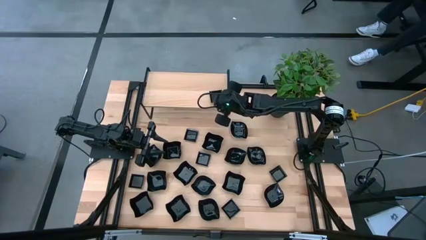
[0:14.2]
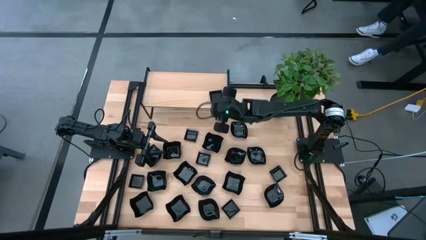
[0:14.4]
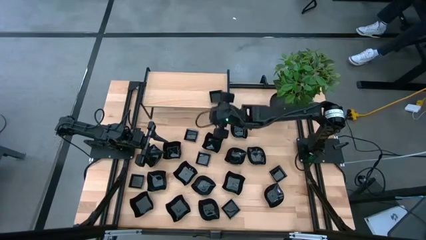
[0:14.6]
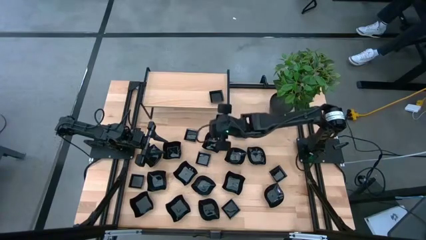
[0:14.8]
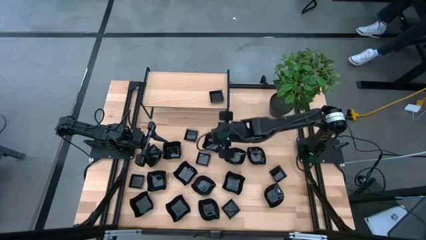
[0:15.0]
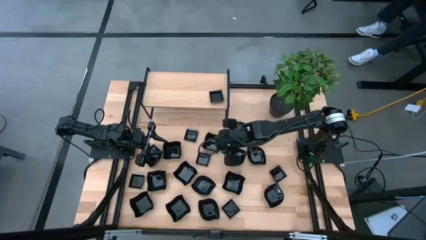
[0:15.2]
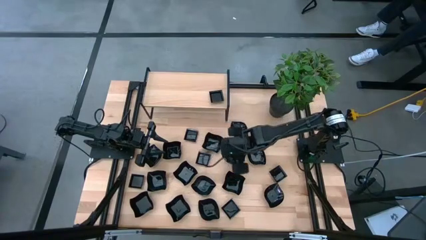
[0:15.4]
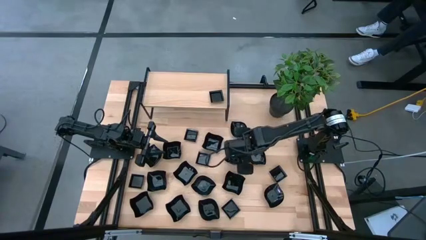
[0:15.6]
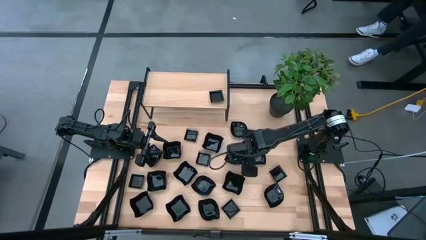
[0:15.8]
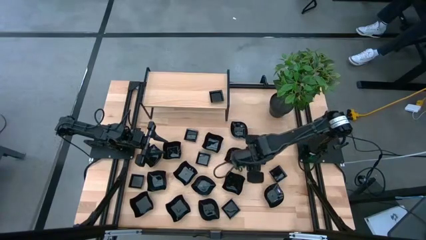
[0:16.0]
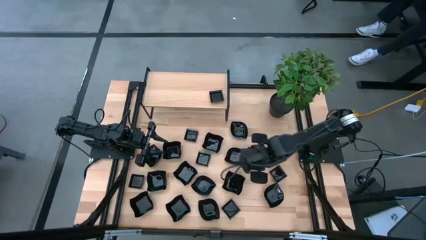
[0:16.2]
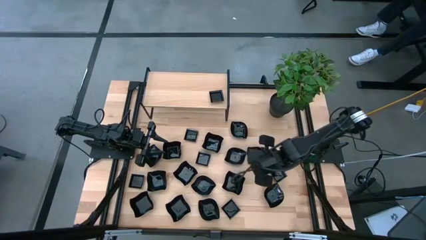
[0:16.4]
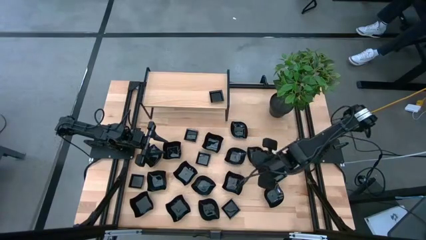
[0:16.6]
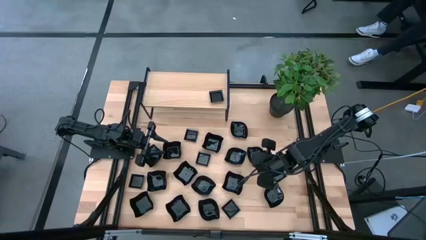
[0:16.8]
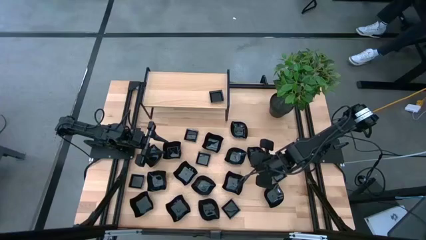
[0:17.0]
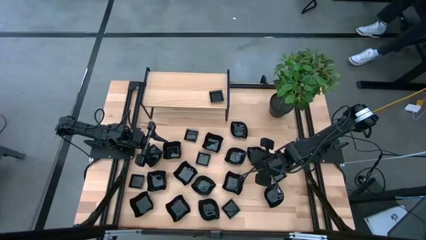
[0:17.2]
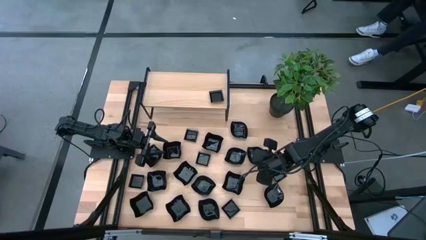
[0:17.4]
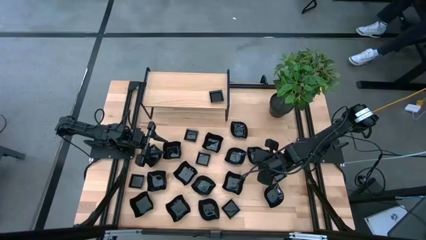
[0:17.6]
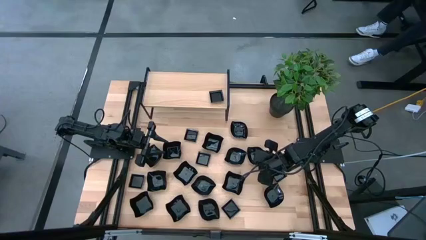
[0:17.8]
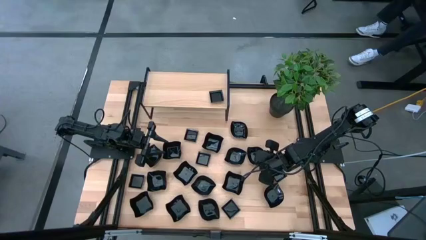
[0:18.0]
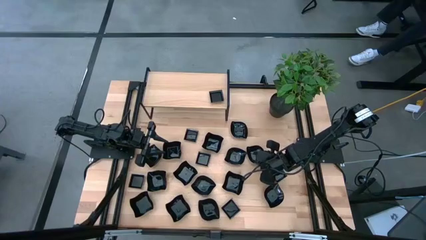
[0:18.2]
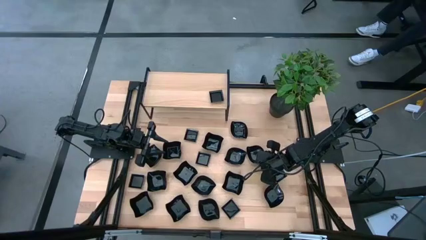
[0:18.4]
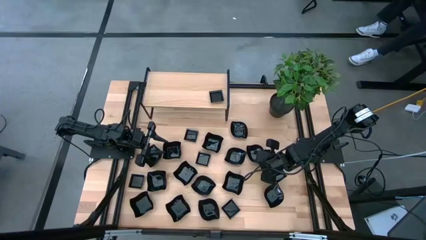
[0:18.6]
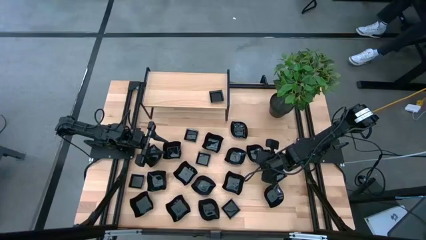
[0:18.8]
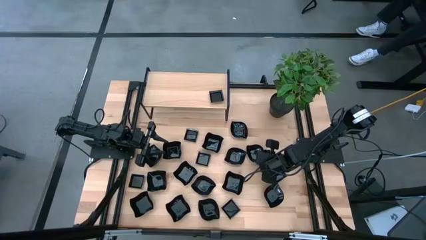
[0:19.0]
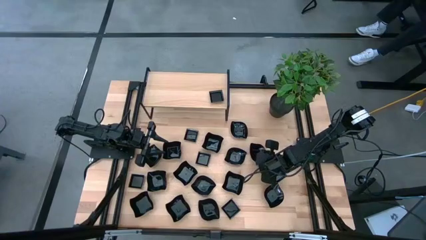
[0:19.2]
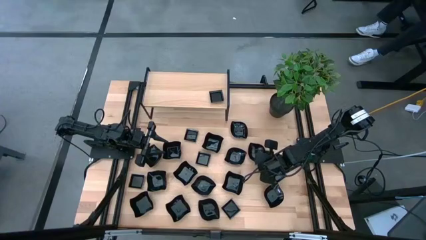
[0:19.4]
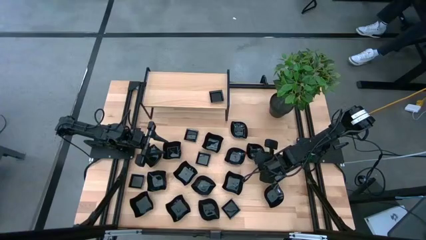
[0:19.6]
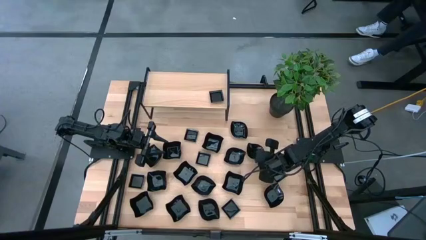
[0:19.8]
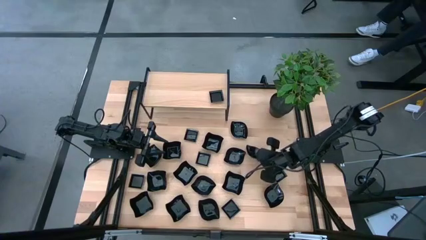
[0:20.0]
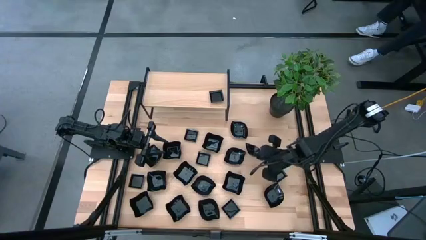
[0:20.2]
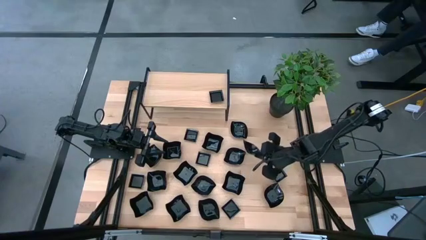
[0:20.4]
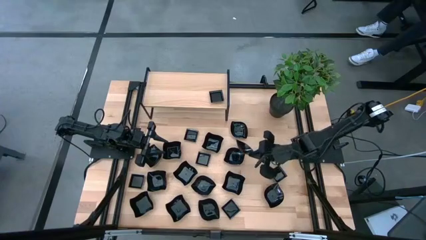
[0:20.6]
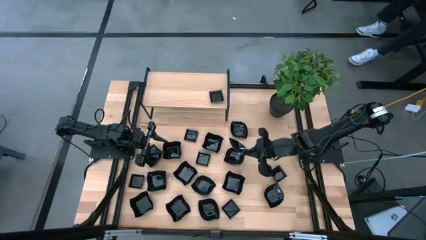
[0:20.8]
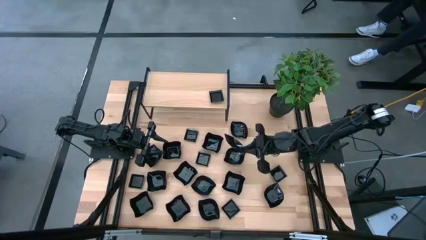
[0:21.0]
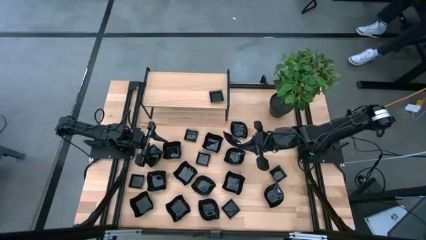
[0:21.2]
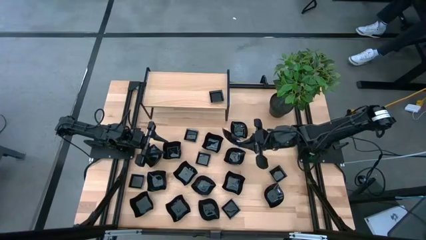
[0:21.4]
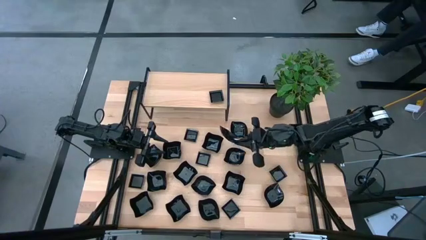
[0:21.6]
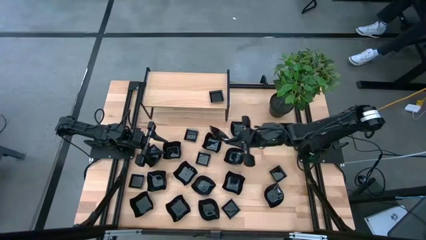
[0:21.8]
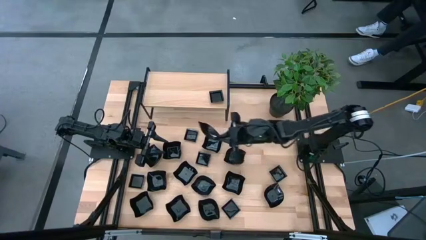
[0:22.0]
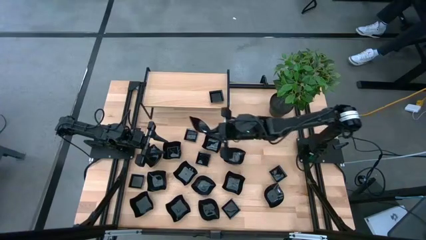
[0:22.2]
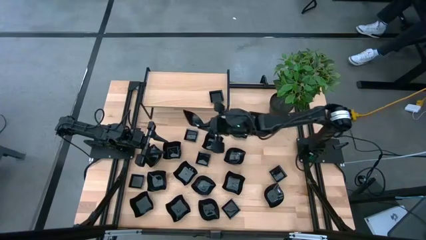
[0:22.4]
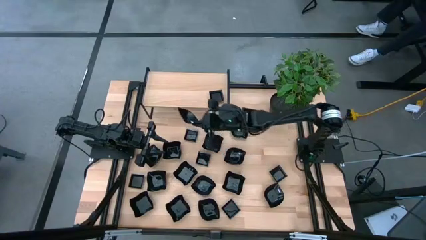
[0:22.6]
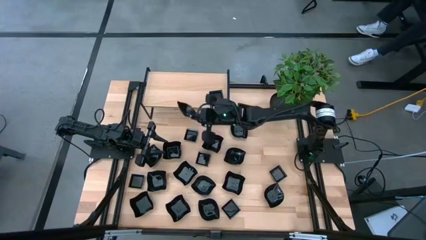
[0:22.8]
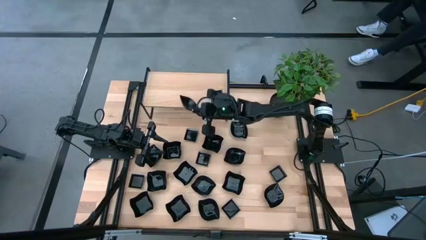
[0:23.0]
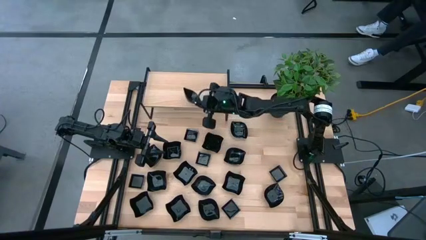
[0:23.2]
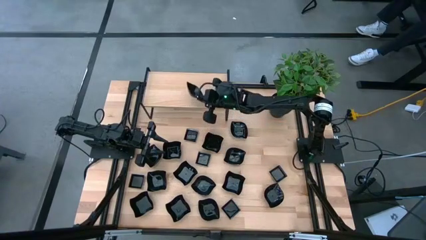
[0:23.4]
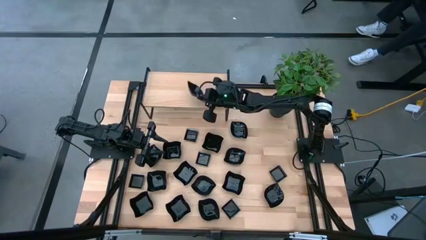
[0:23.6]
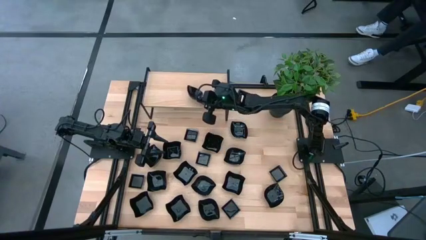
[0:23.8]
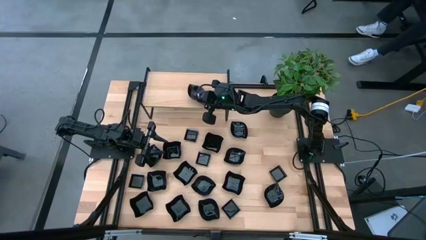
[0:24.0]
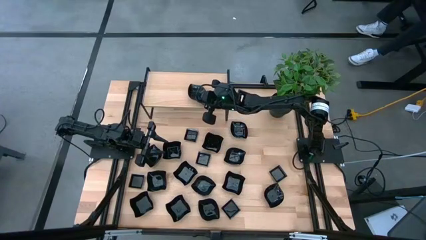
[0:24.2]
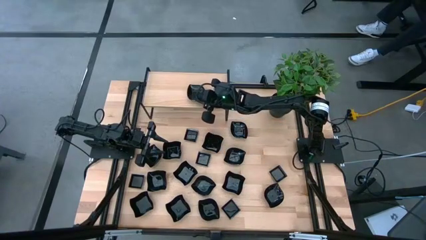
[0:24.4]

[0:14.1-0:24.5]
Task: Pick & Place Mini shaped plates
Put the leaf shaped plate on the shelf

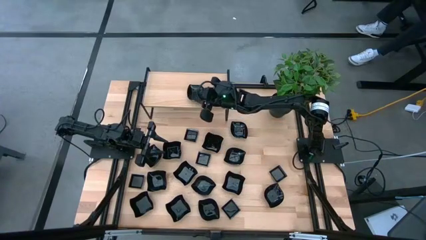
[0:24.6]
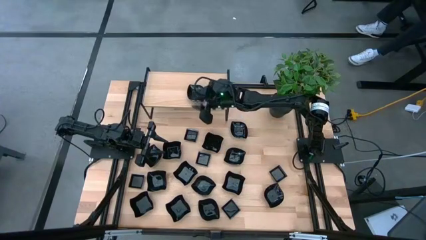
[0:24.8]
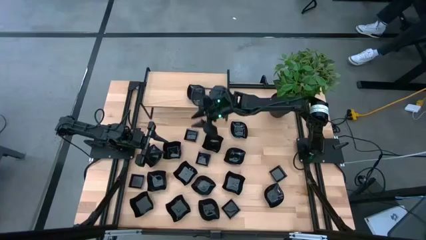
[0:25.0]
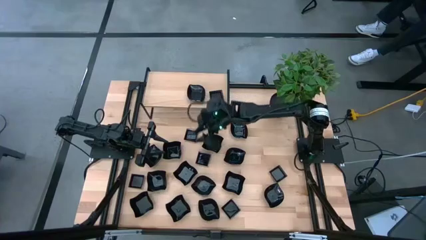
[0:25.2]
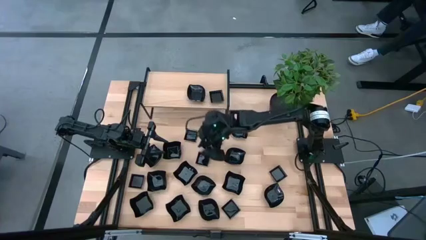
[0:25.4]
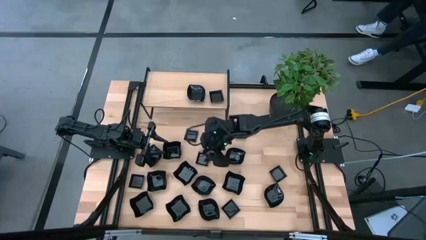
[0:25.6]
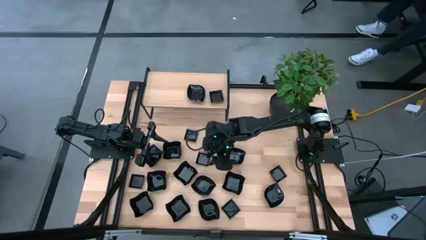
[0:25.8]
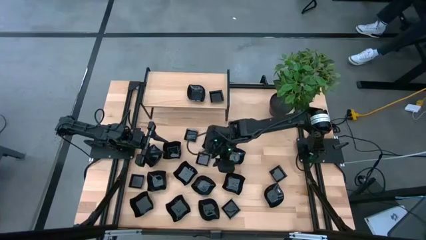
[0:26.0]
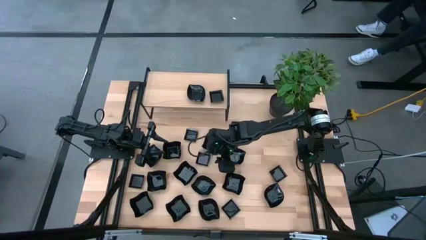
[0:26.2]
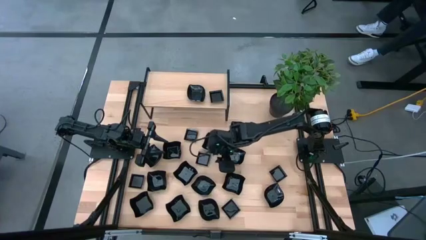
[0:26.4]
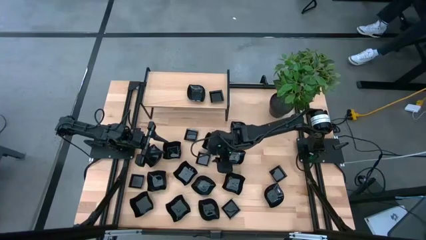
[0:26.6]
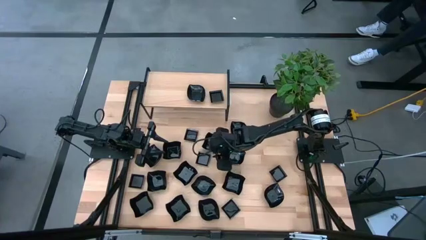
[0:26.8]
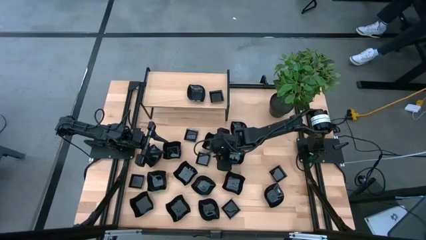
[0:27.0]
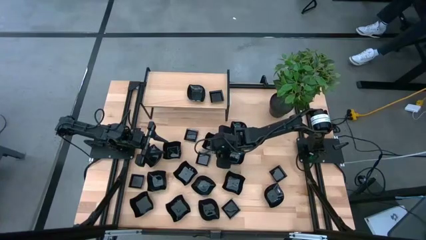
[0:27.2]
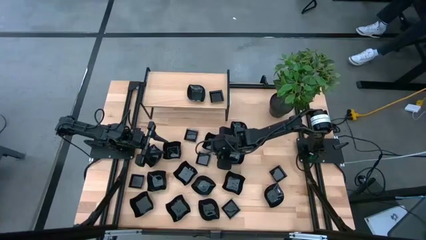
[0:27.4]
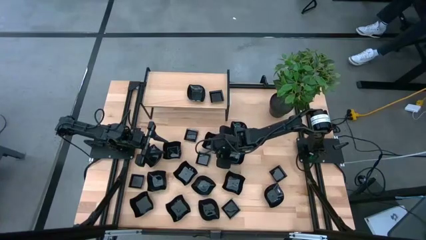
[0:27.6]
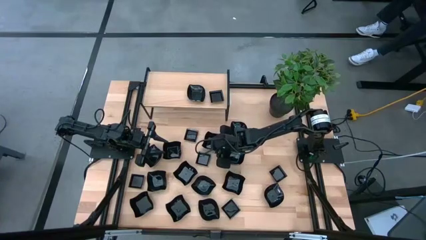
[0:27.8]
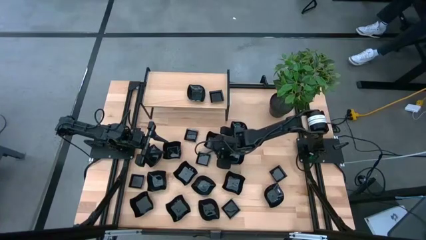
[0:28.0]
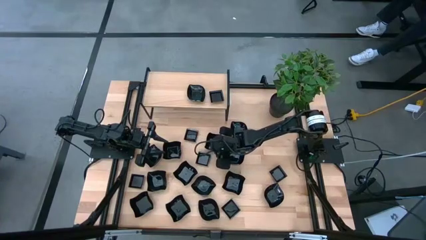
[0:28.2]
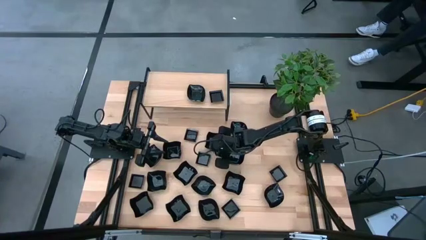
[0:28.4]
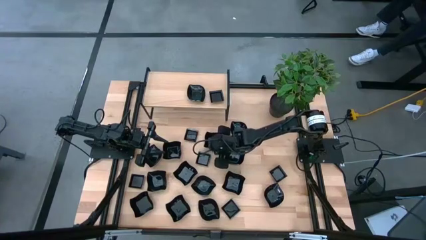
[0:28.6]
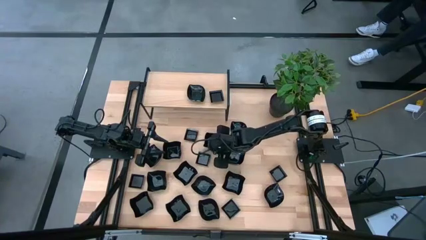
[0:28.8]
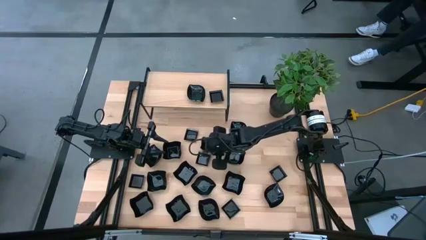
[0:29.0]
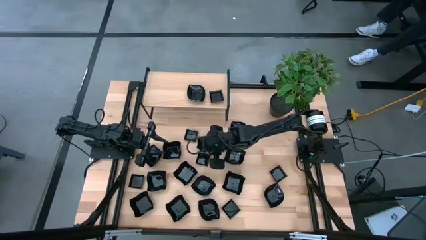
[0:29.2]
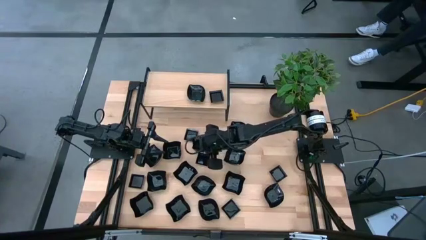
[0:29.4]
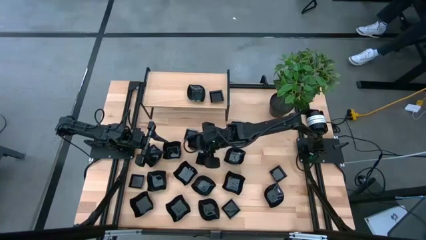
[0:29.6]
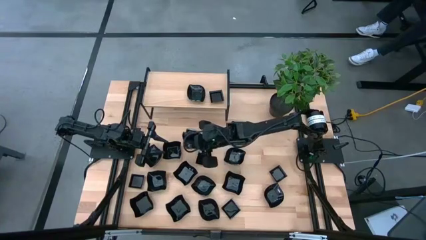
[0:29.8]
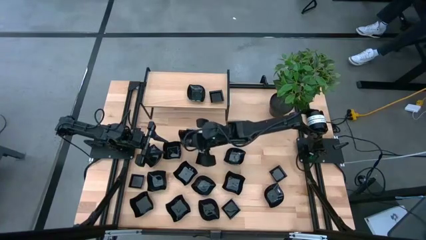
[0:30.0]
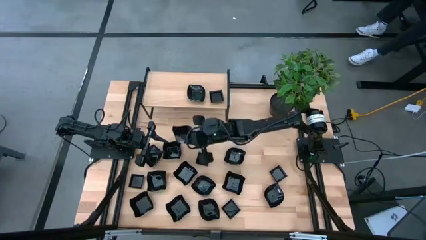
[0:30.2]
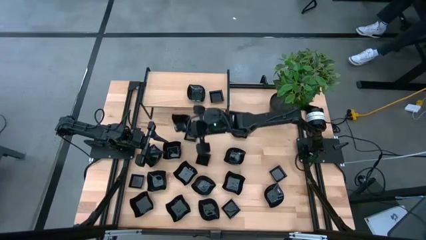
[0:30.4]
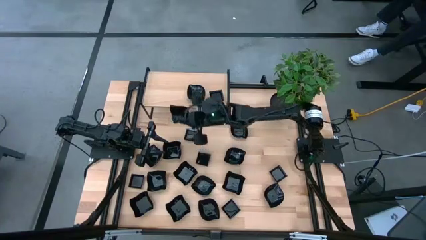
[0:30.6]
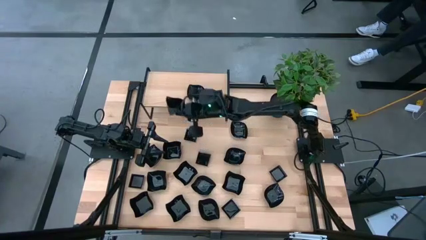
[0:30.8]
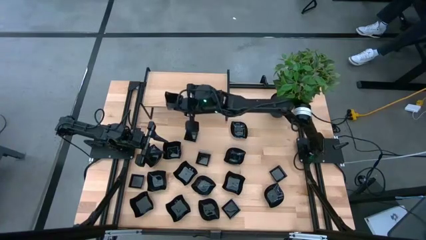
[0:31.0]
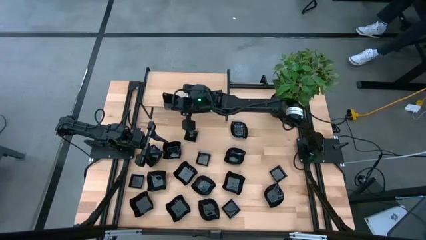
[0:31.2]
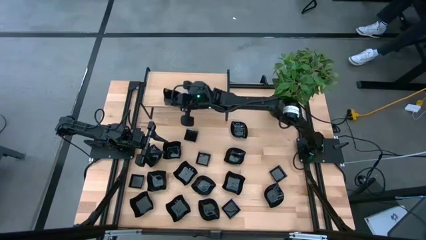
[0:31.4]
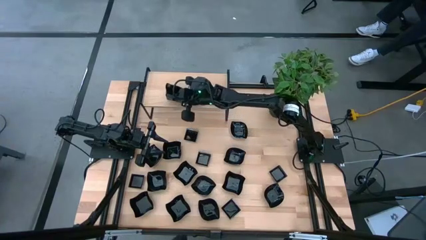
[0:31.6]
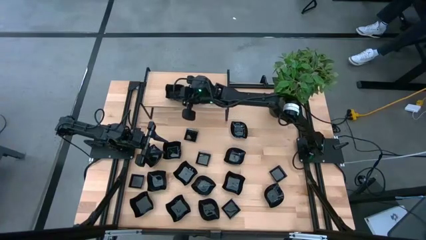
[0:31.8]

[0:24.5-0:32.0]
Put the distorted square plate on the shelf
